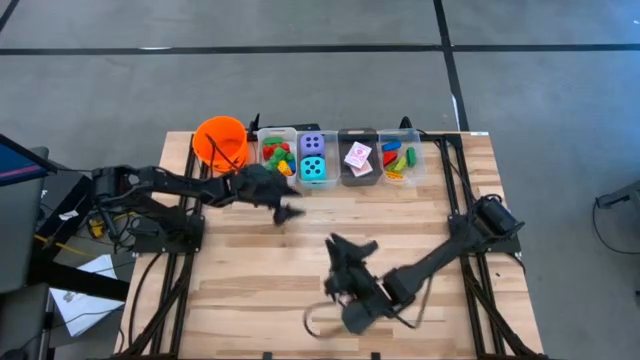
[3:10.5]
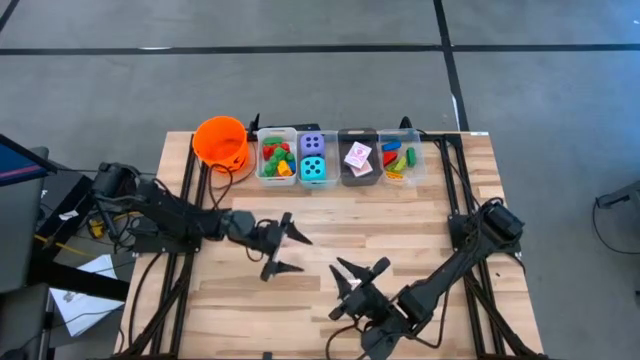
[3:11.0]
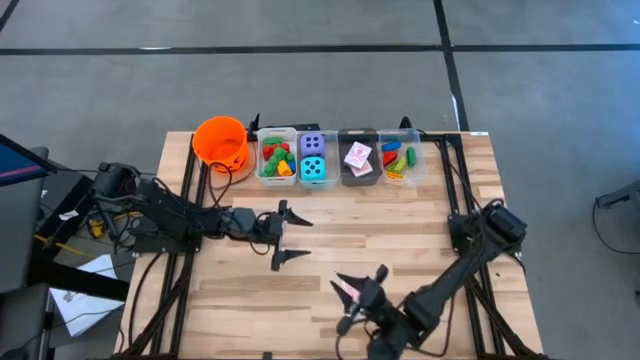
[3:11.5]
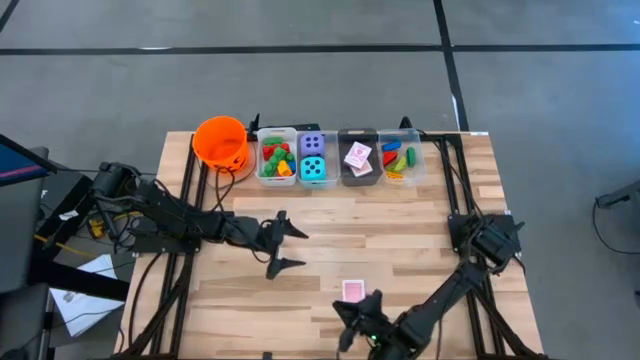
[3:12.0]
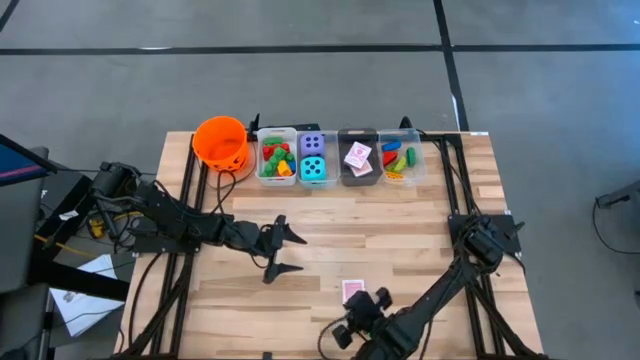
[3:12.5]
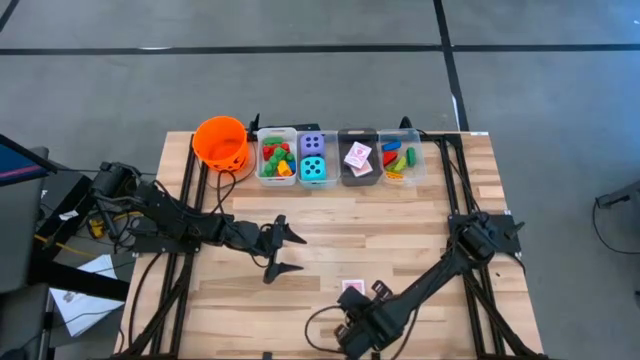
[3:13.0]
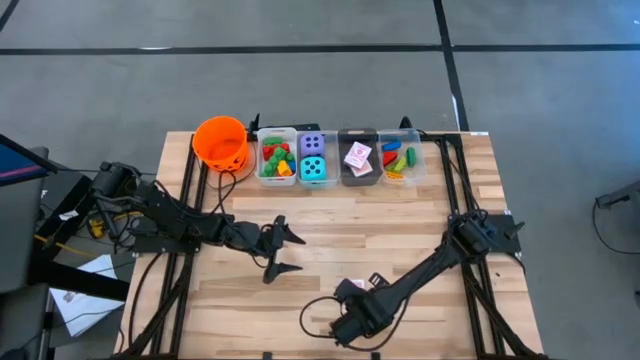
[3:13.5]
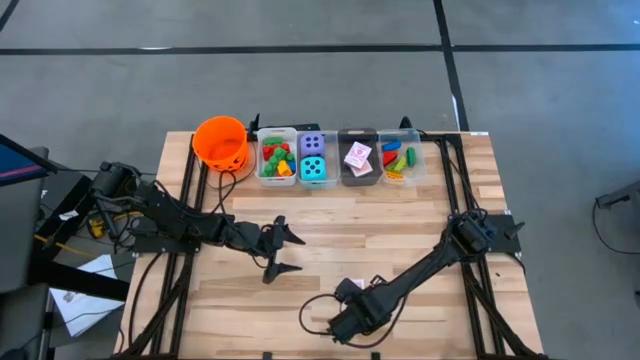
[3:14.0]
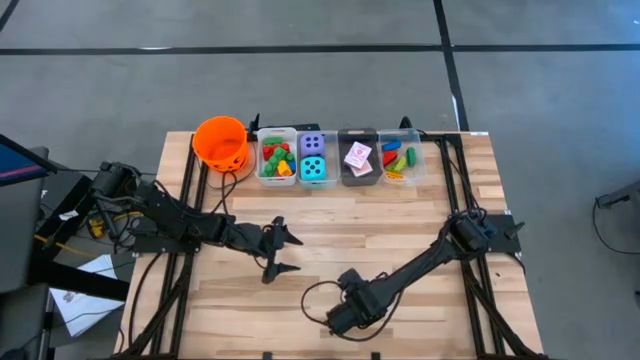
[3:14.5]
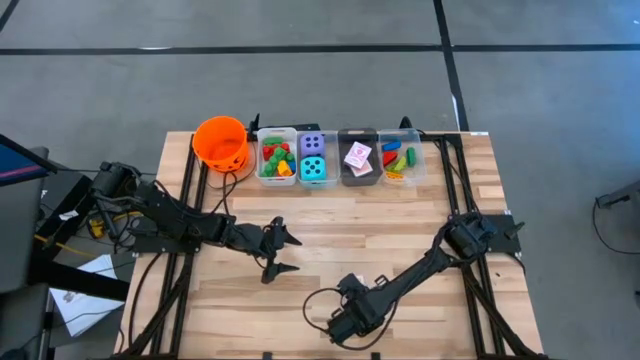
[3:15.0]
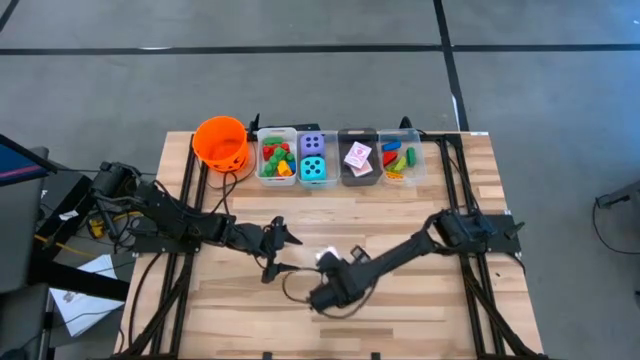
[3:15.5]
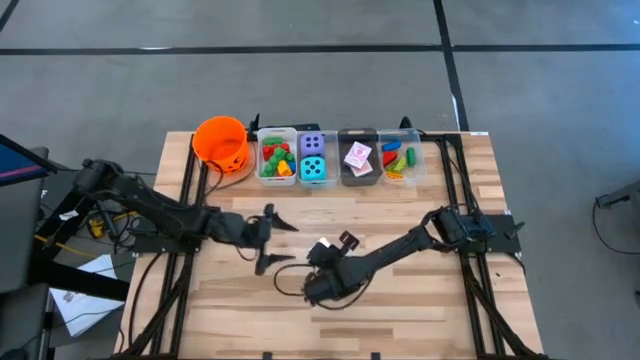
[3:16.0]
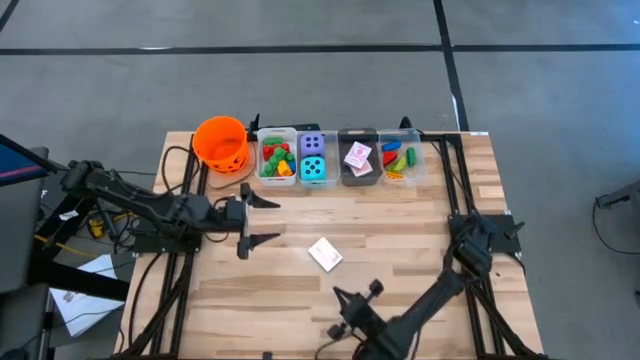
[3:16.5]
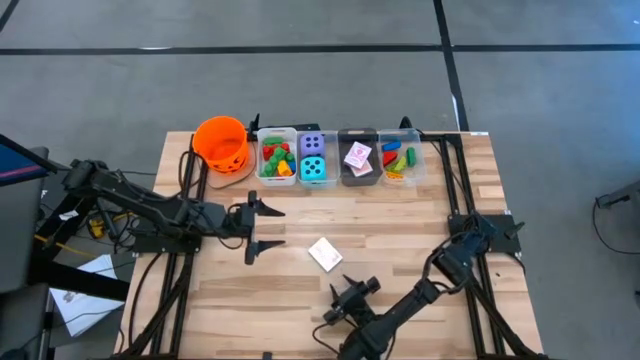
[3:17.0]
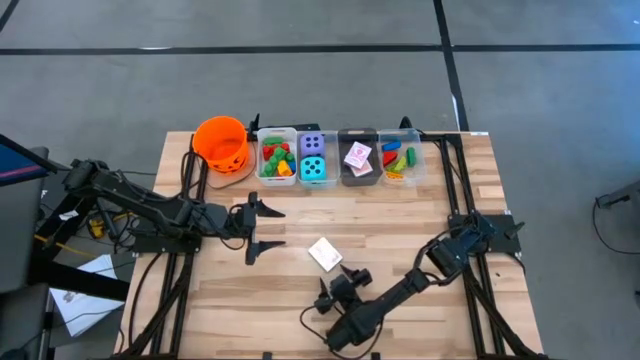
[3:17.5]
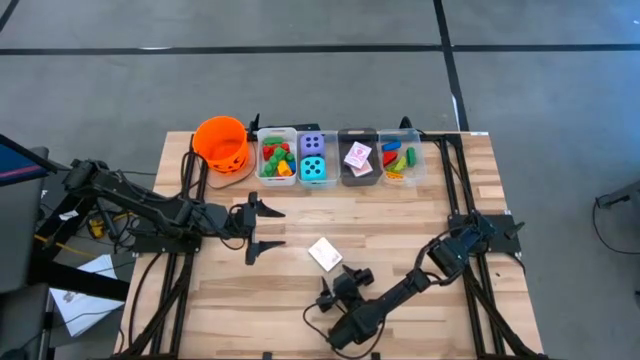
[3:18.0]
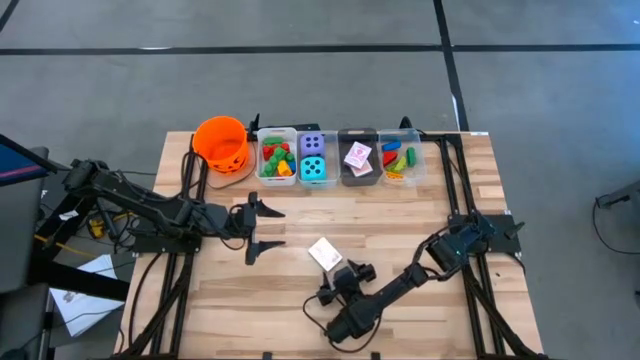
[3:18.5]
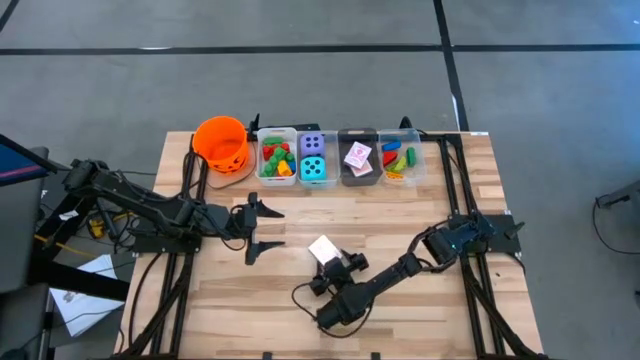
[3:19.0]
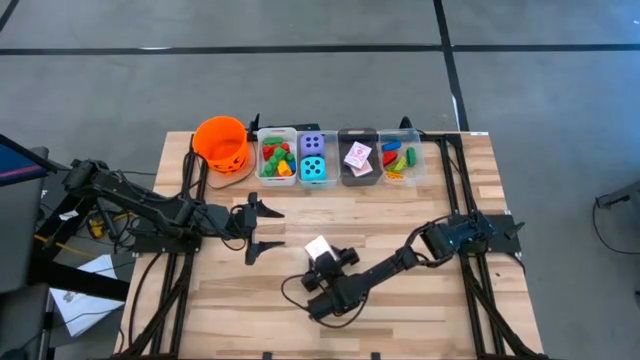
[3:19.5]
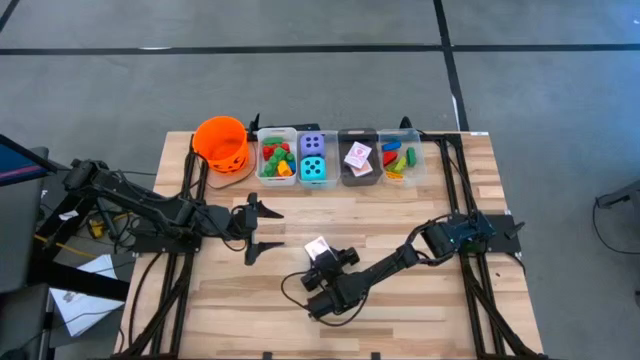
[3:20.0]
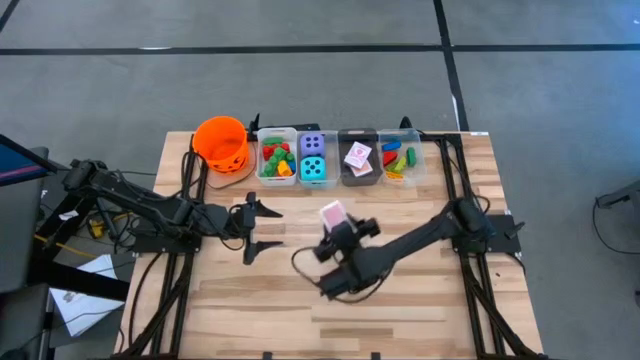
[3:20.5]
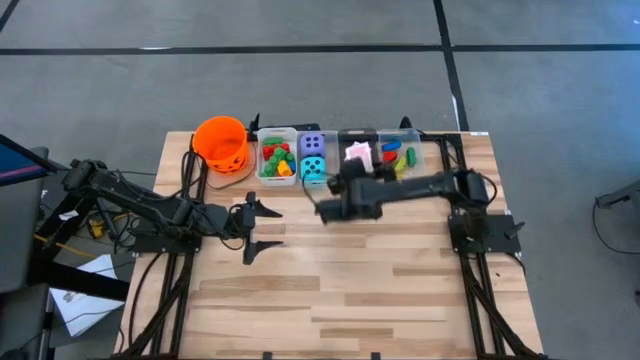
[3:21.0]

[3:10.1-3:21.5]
Task: Pick & Place Toys
Put the red deck of cards into the black bin

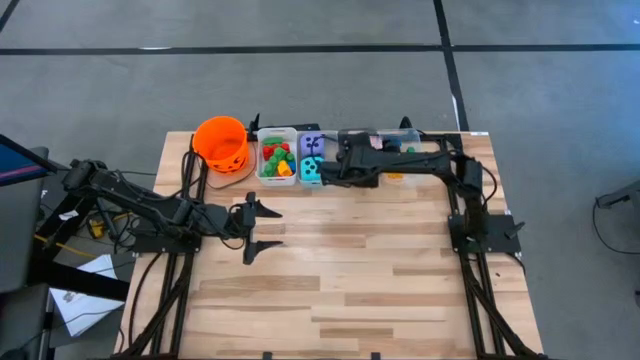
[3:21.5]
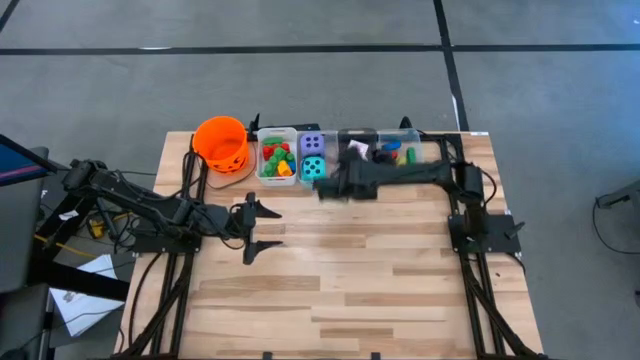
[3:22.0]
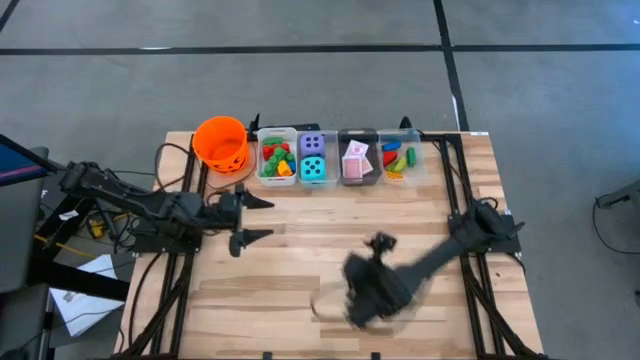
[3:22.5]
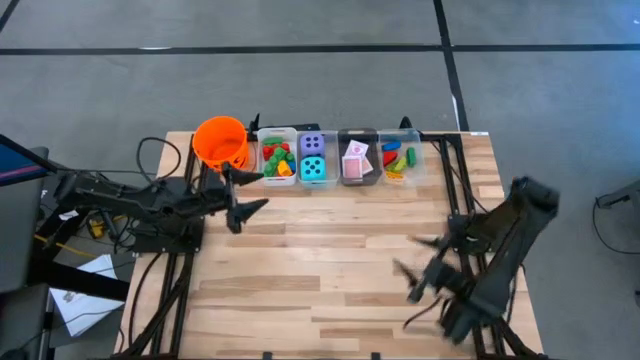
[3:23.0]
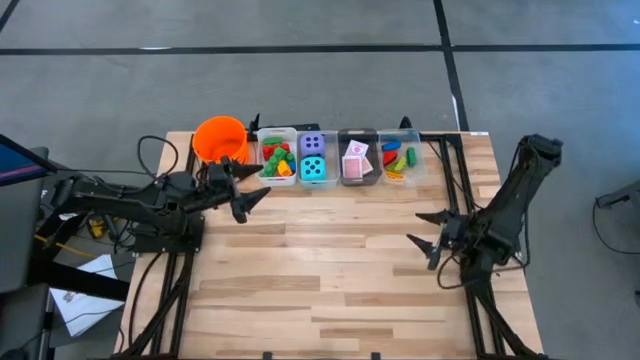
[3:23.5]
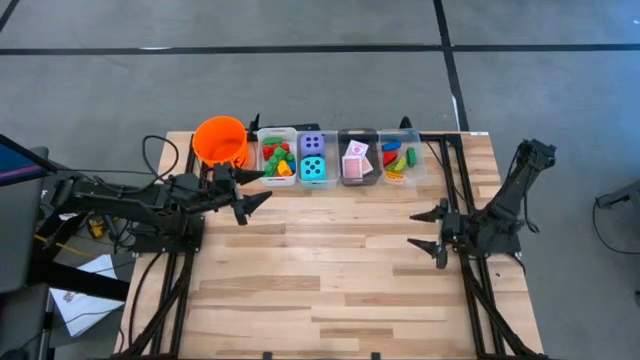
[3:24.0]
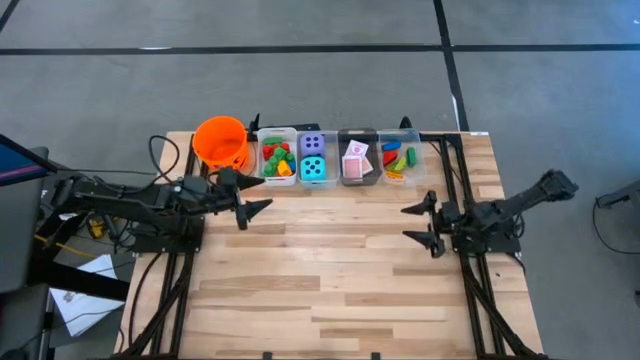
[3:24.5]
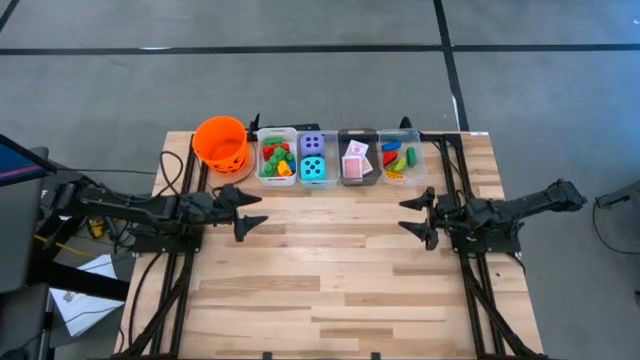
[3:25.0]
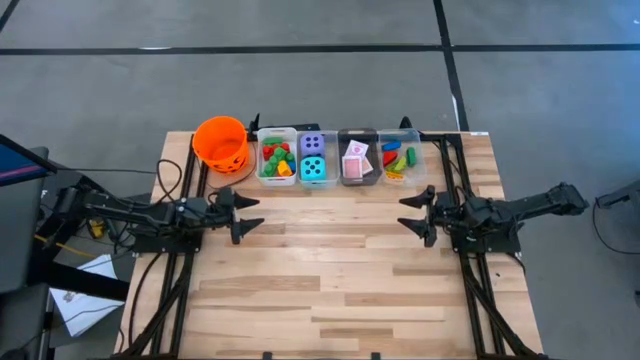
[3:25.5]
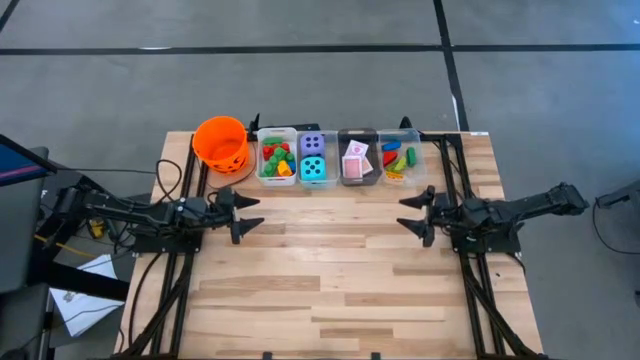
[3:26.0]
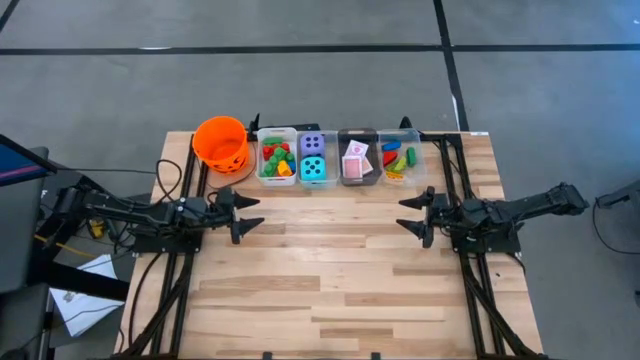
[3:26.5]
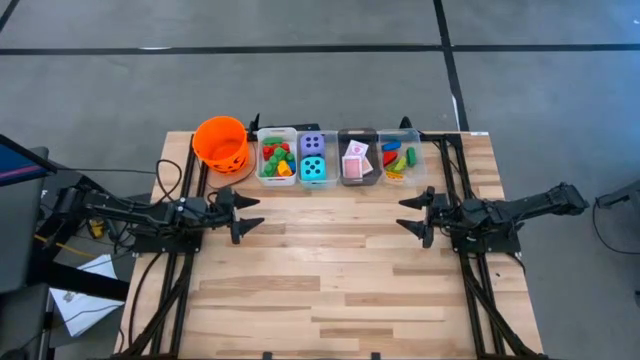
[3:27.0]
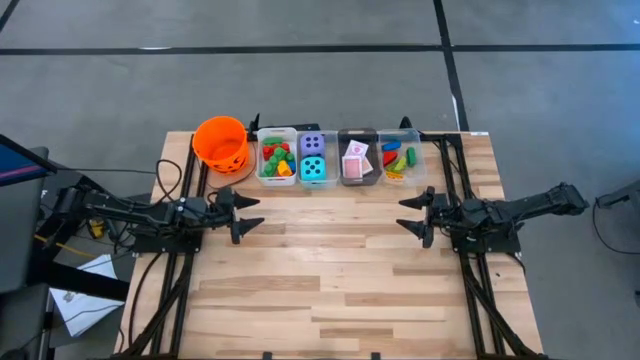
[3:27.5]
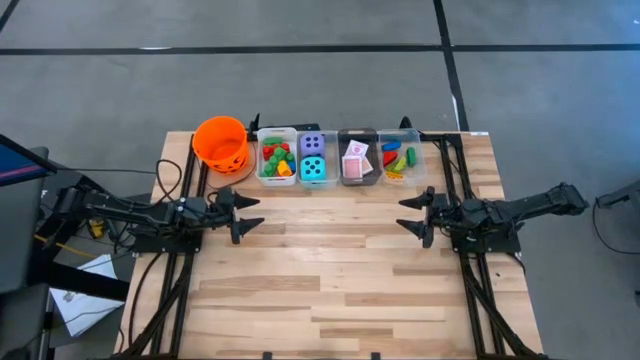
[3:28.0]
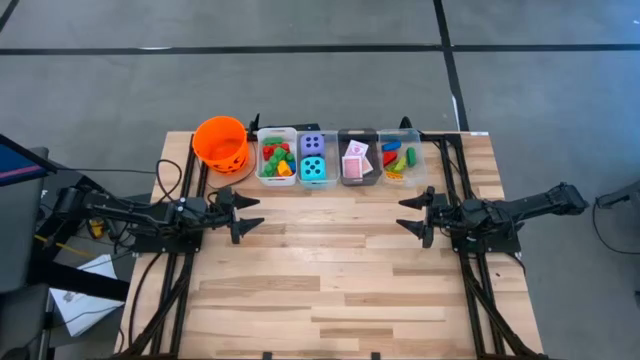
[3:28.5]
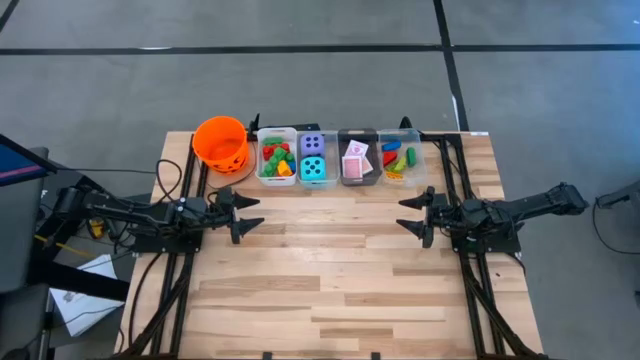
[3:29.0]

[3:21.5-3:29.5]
Return to Home Position

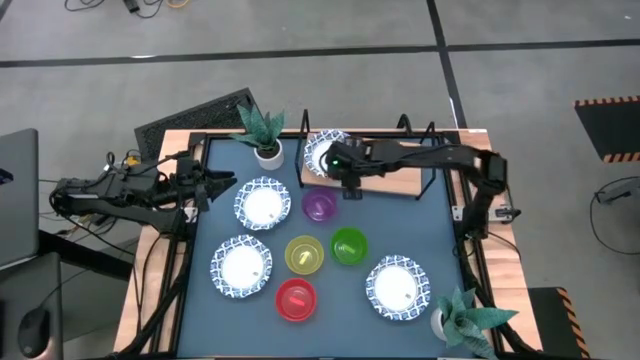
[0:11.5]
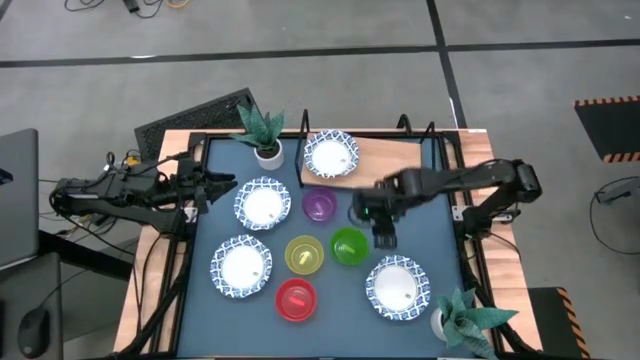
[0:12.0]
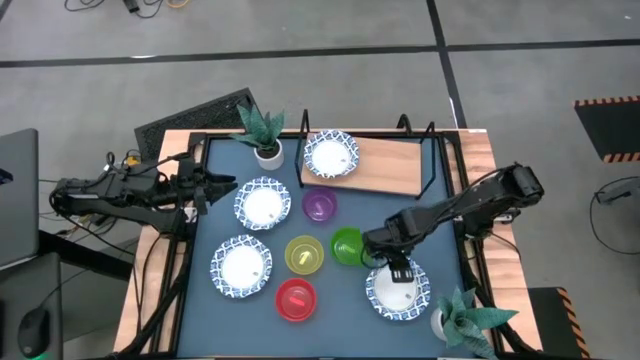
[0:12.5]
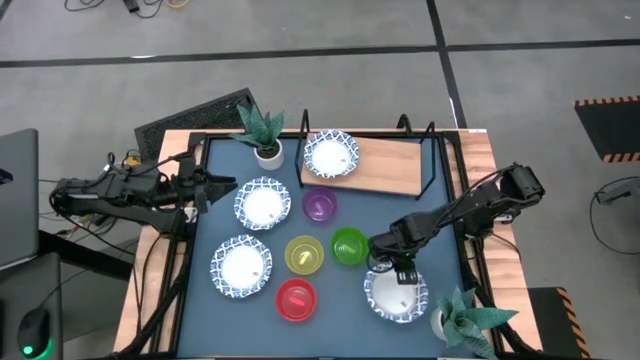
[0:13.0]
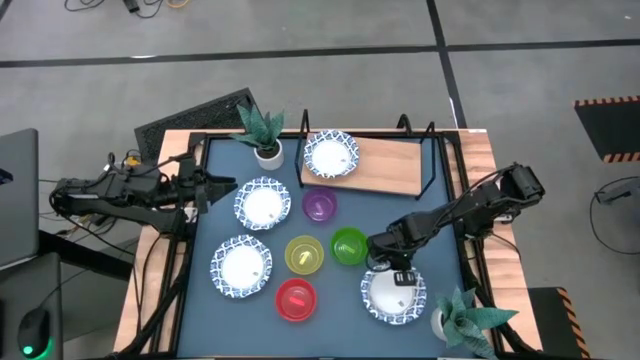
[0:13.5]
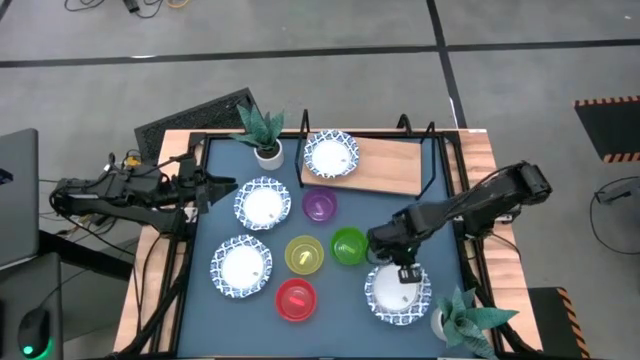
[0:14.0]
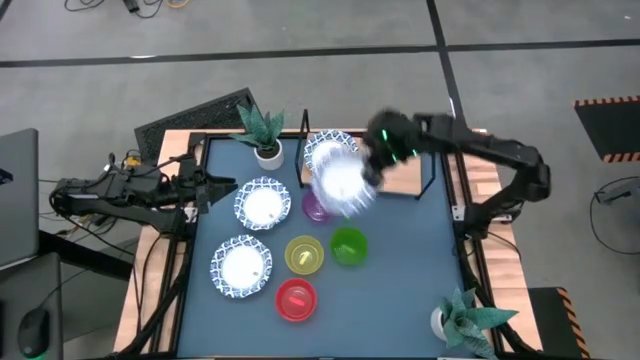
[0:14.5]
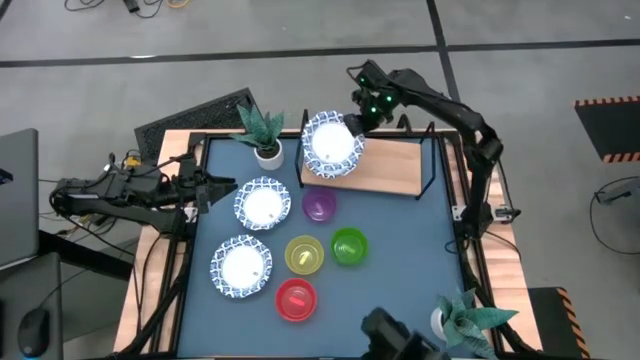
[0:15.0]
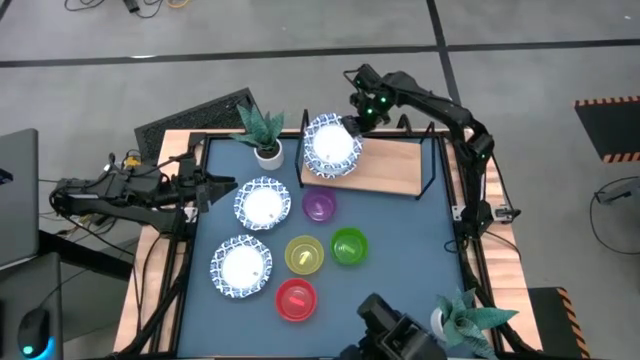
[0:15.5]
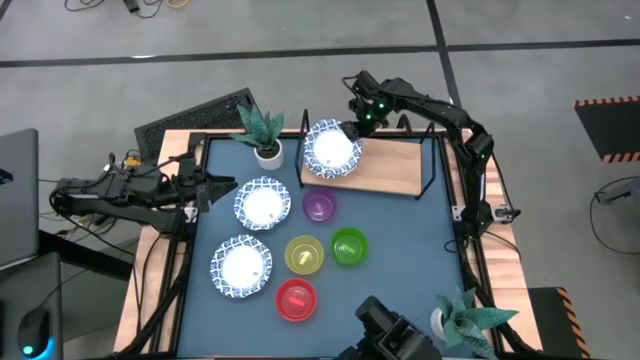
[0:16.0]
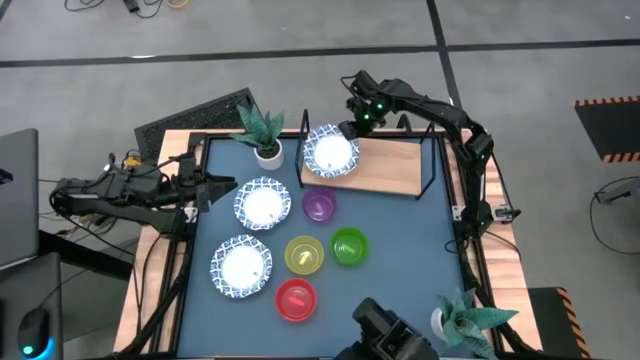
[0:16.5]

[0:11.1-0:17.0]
Task: Place and stack bowls onto a shelf
Stack the white bowl on top of the white bowl on the shelf
